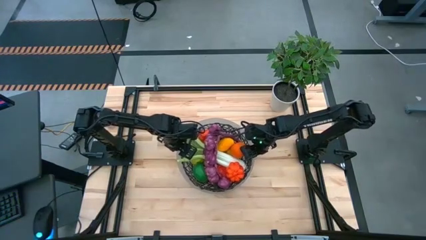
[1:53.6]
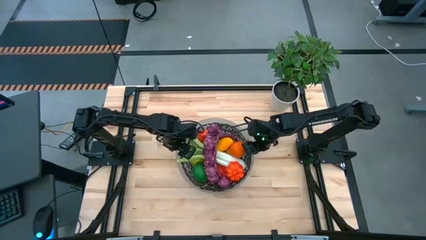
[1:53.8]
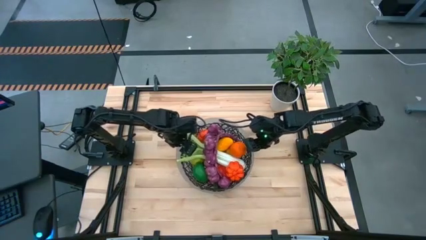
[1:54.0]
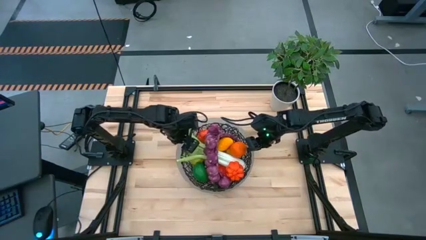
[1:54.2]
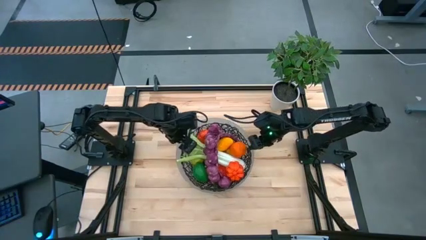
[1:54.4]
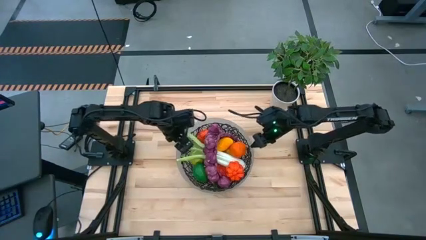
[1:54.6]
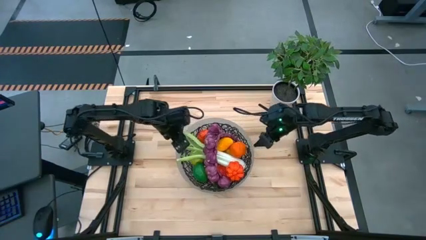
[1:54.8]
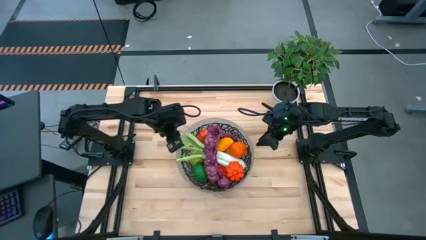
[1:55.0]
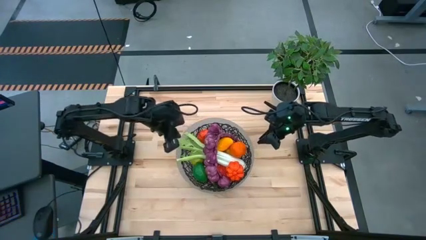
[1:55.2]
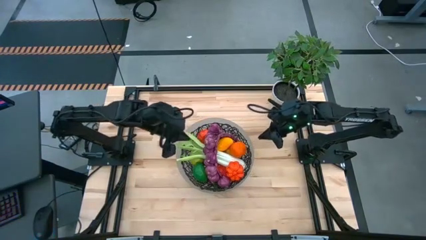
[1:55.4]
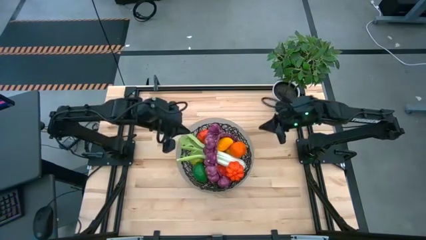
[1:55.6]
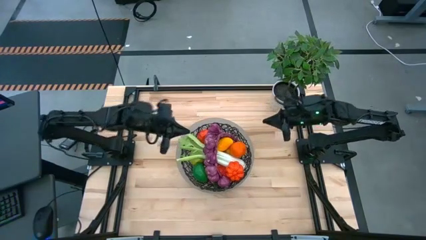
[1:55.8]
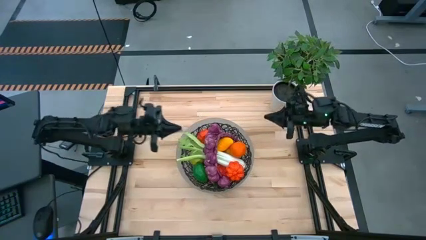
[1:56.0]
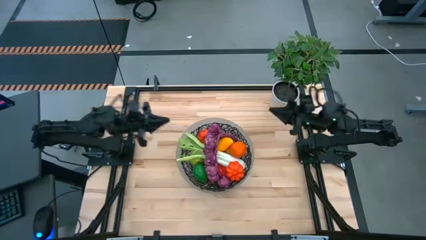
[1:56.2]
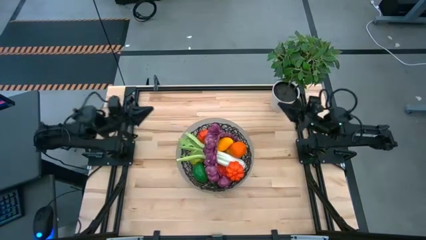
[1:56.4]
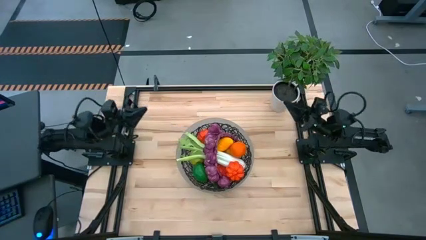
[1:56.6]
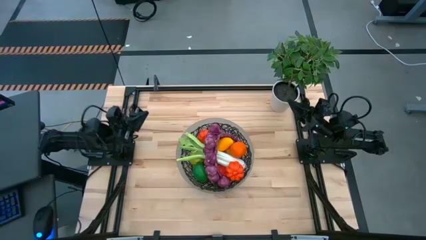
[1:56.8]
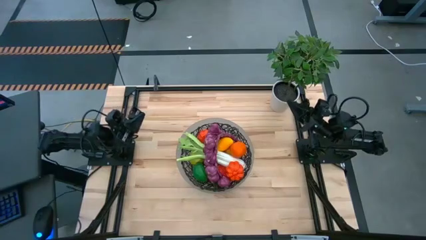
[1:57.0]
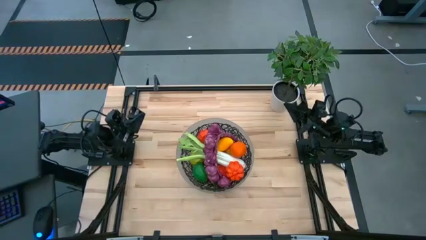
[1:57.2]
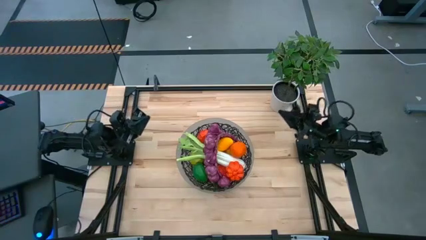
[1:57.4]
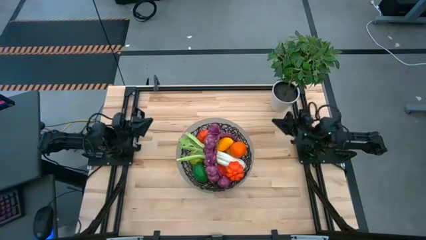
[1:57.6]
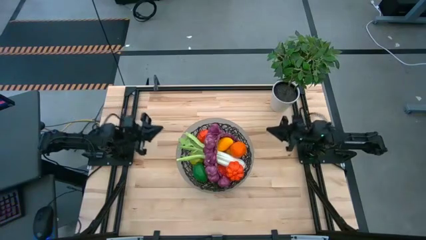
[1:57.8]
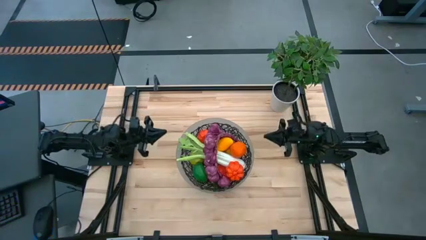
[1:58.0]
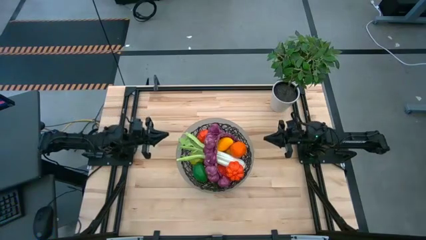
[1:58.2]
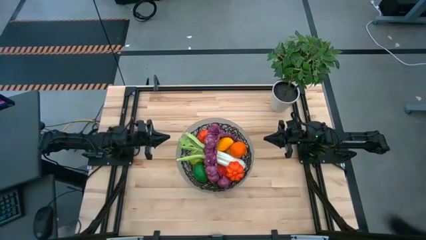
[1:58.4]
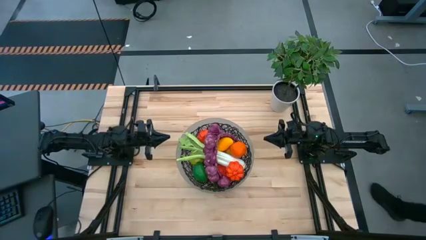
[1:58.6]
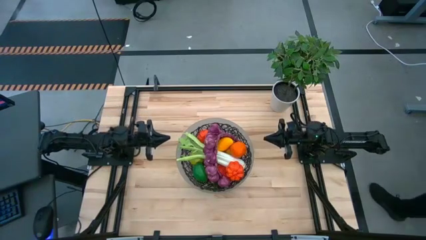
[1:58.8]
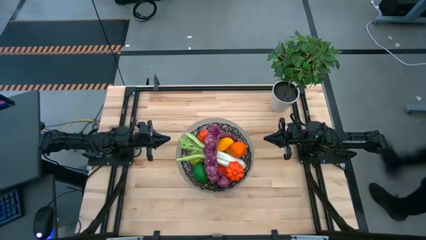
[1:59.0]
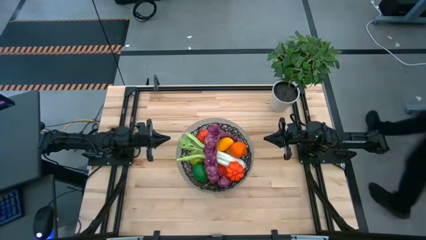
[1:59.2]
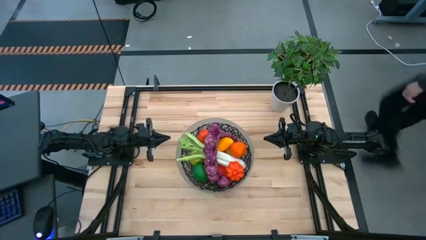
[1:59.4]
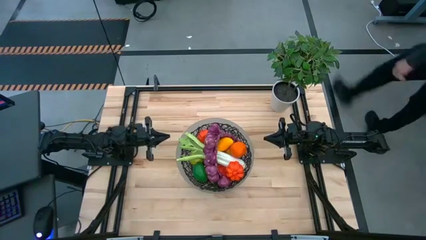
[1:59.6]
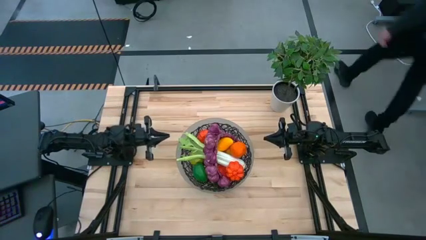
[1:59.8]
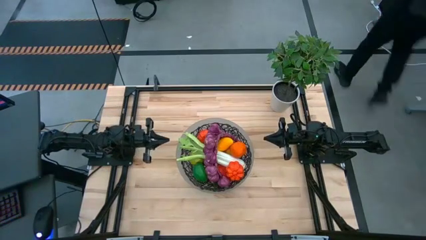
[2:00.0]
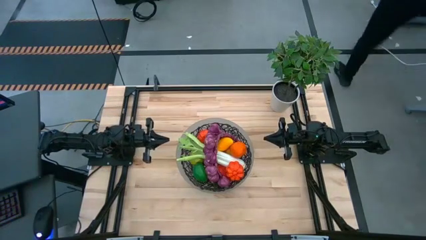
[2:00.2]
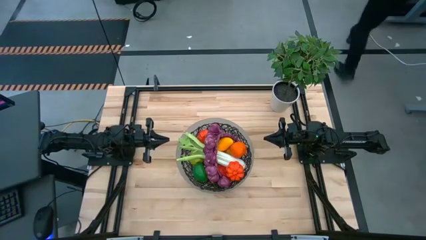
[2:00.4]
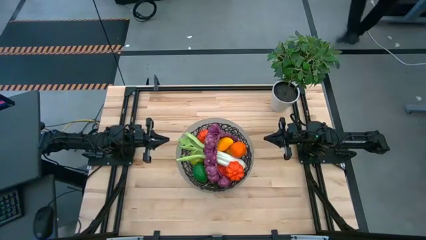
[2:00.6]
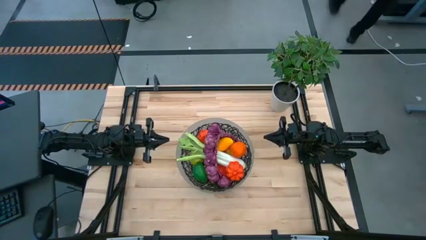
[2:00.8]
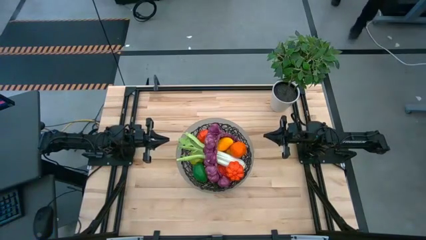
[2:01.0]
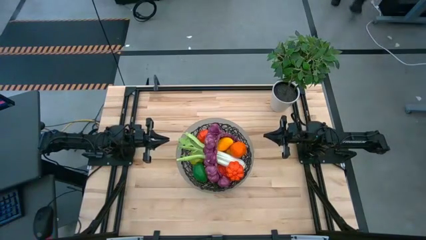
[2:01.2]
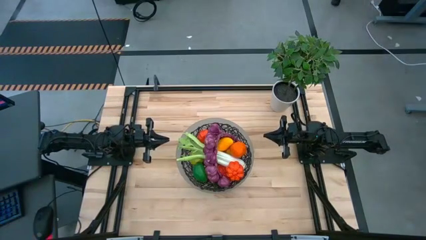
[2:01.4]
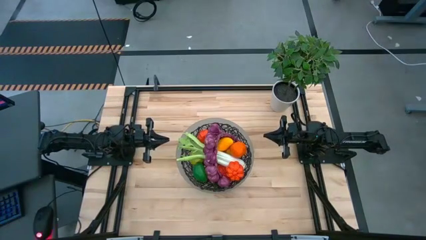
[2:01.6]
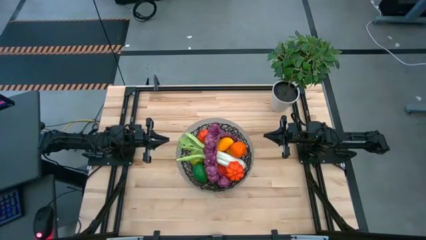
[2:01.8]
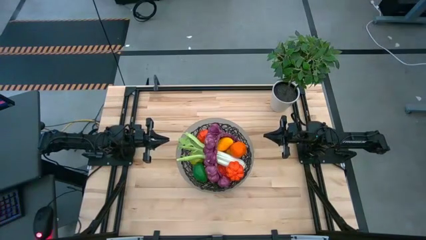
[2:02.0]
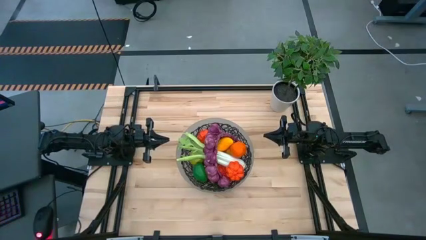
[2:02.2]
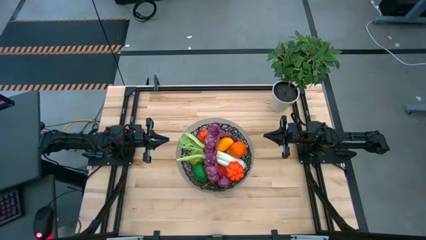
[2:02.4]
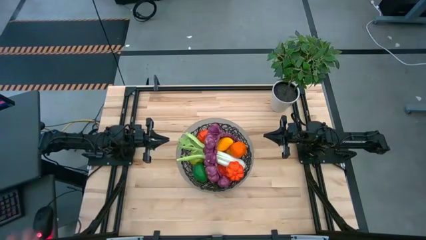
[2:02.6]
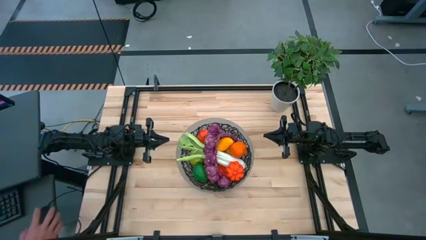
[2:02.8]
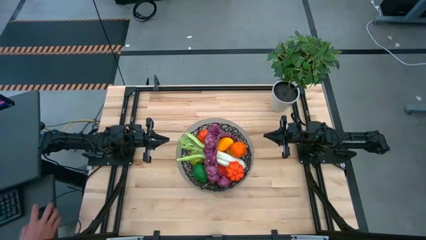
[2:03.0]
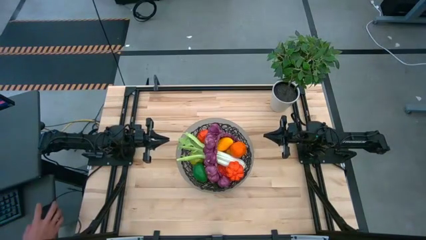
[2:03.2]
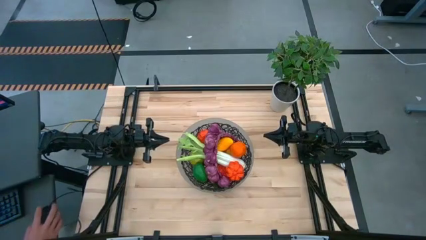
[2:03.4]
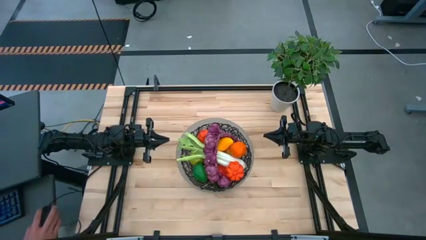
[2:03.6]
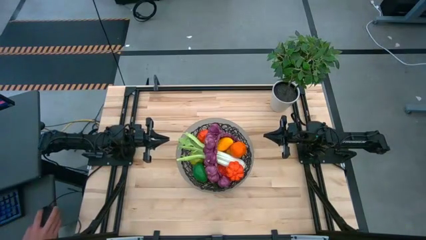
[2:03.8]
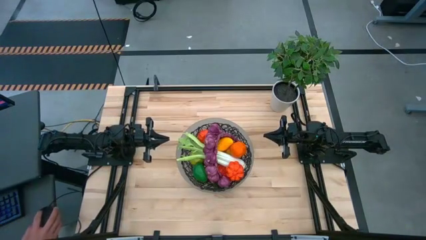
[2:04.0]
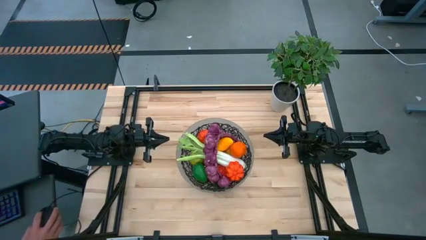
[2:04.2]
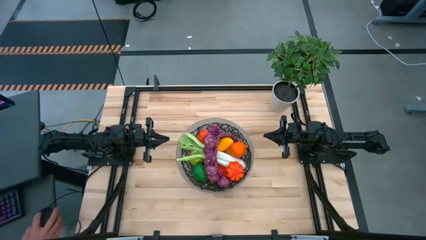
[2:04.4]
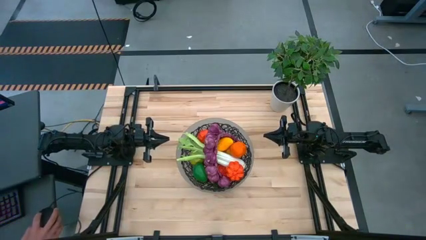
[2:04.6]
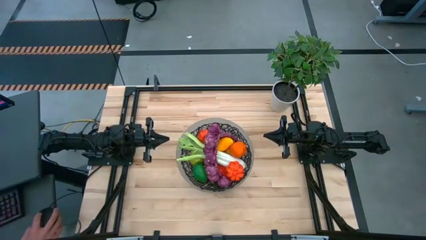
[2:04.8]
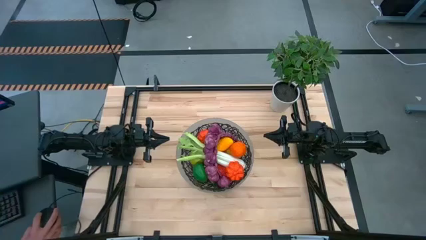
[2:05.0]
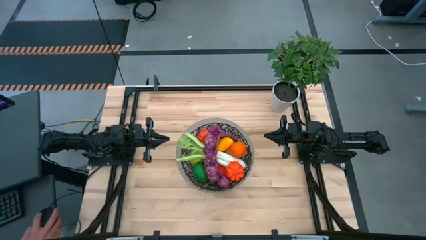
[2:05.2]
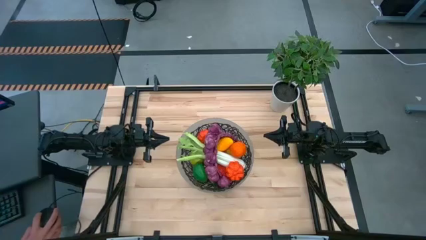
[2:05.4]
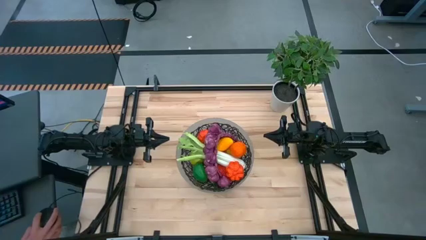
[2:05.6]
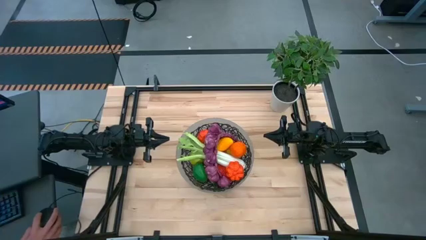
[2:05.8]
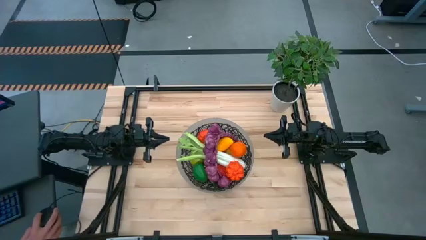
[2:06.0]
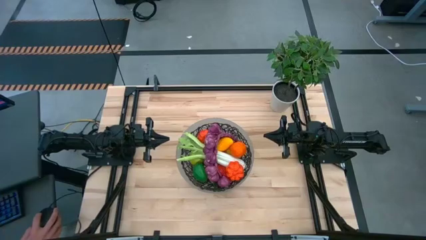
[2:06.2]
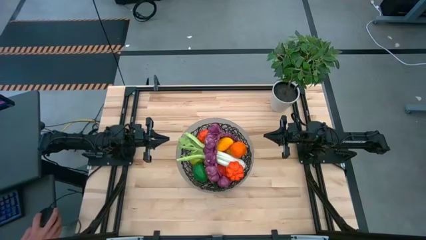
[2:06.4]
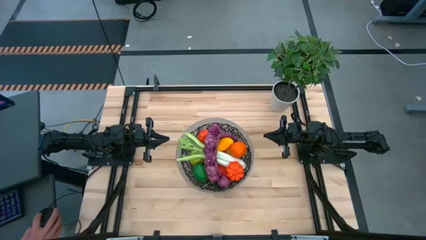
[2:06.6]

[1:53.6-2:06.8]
Task: Build produce basket
Return to Home Position

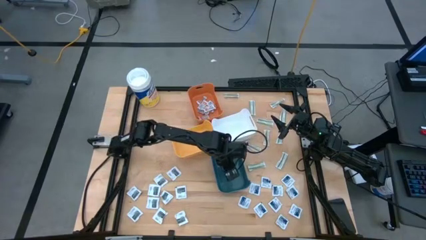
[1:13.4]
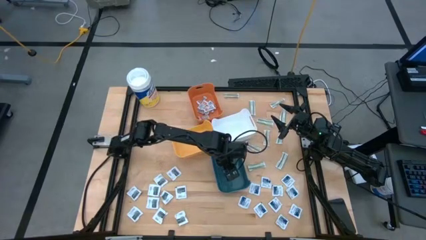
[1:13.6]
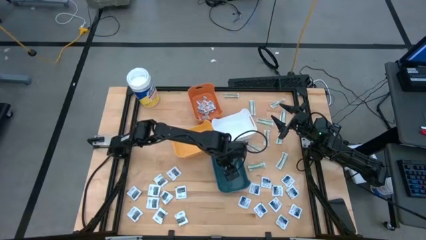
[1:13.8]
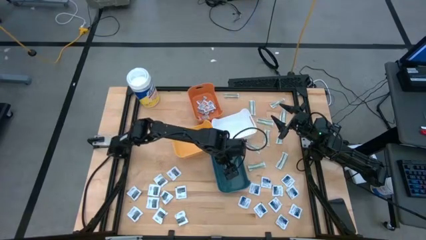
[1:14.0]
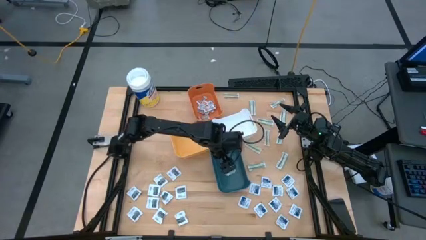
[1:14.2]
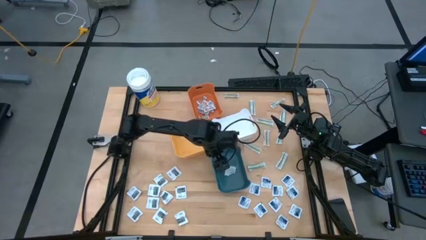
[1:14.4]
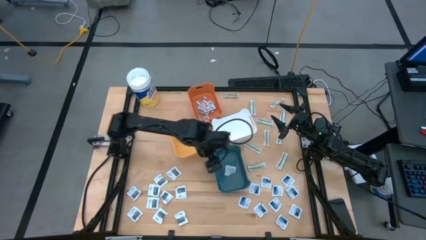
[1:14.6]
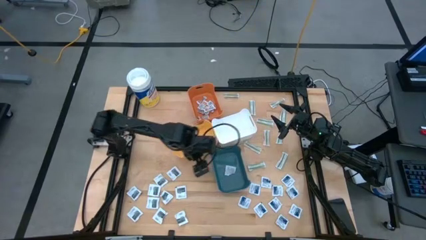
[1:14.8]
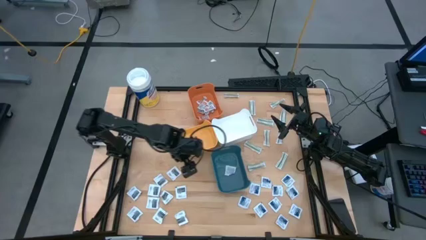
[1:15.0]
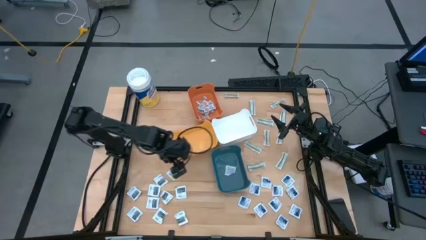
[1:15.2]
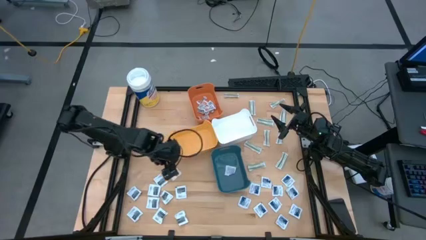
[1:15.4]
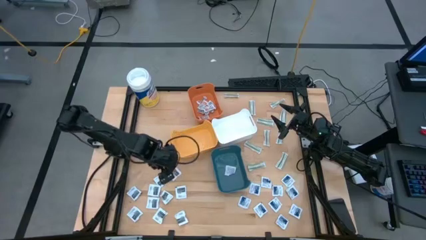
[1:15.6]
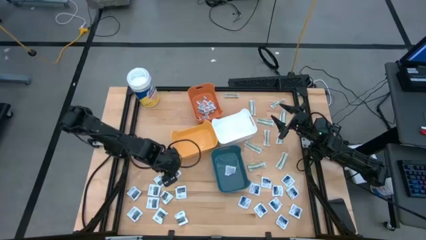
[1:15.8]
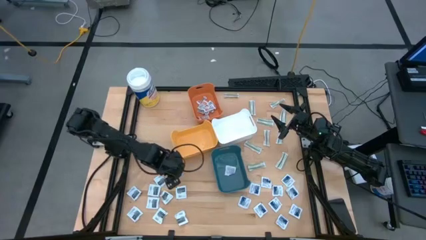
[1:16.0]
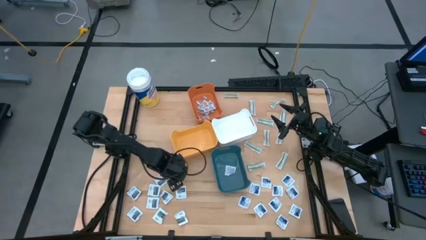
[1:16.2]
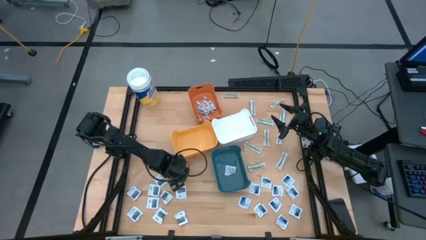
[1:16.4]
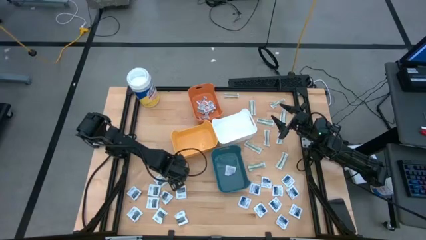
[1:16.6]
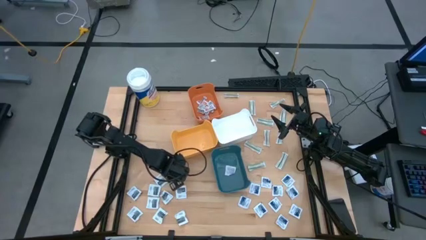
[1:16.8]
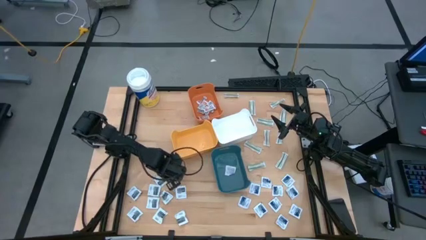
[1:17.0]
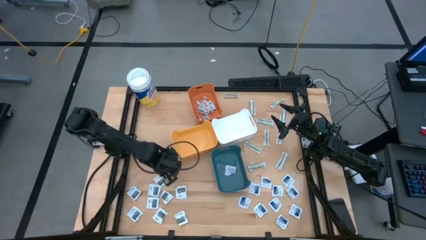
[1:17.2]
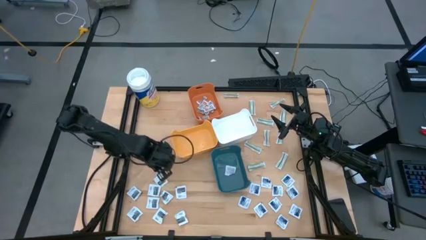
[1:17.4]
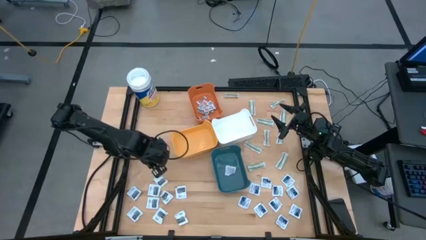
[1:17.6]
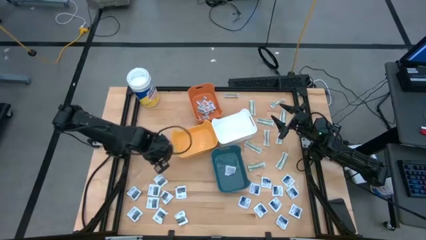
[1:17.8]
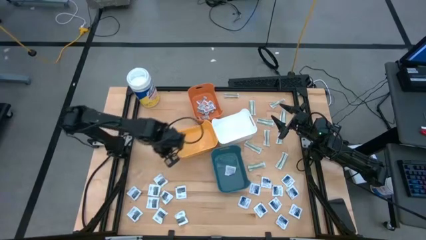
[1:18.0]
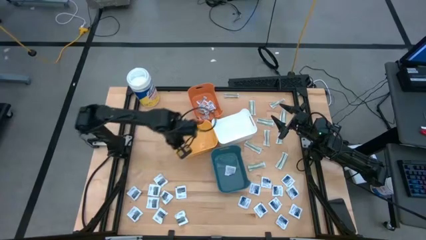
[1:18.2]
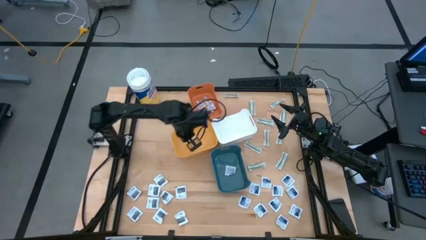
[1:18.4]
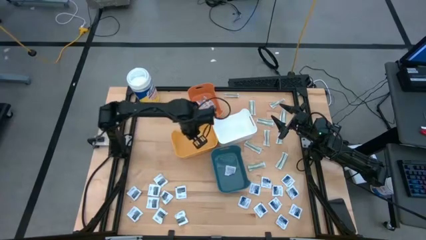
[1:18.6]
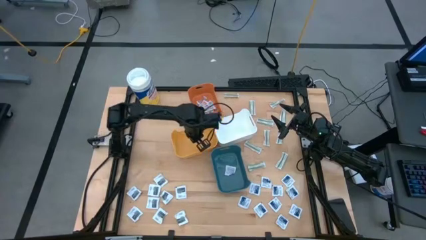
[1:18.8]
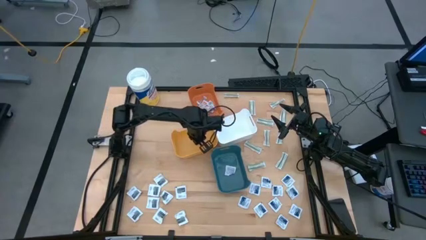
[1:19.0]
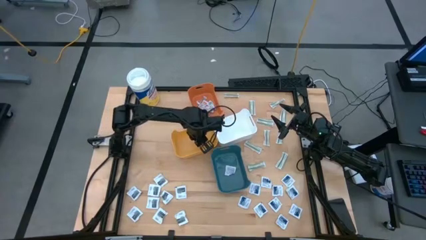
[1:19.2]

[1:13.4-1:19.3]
Task: Pick & Place First Aid Supplies
Put the black towelette pack into the yellow bin
